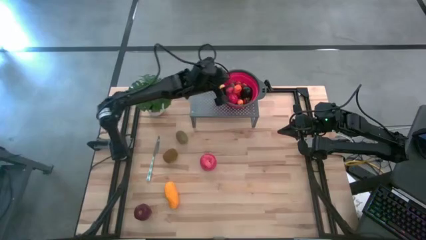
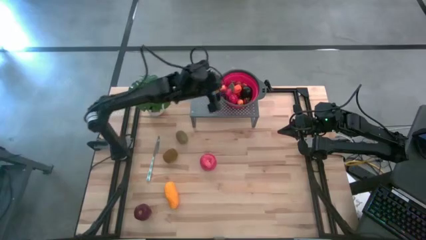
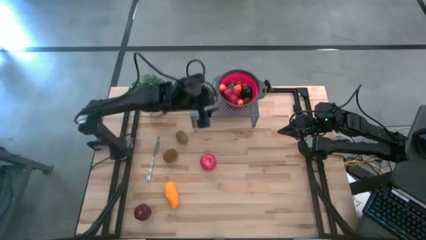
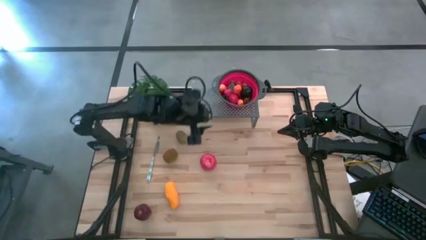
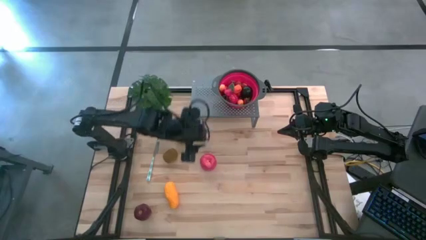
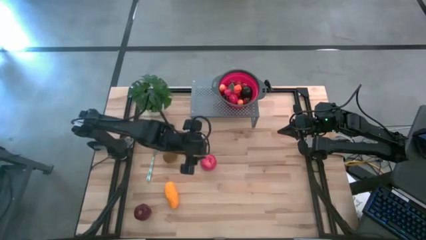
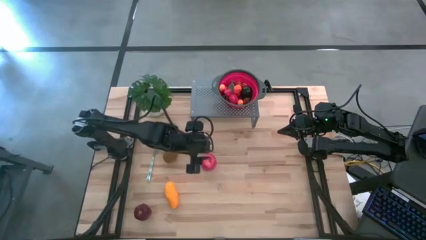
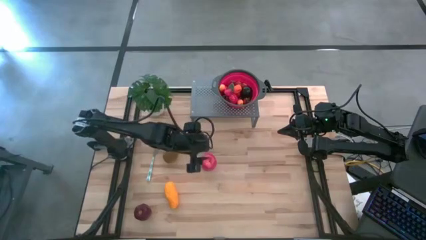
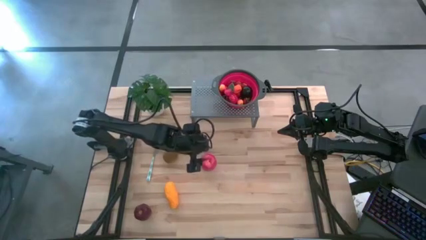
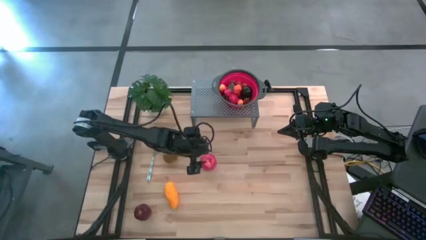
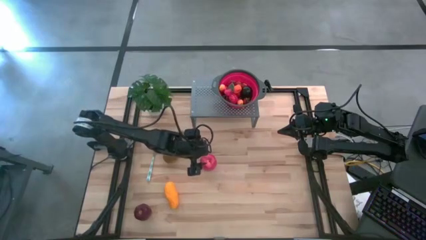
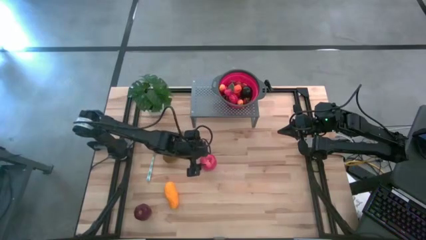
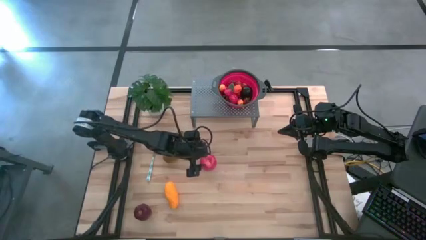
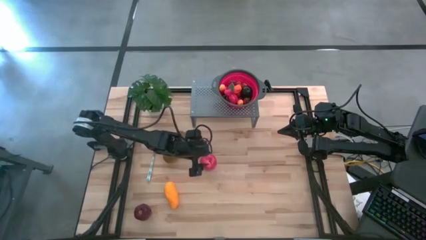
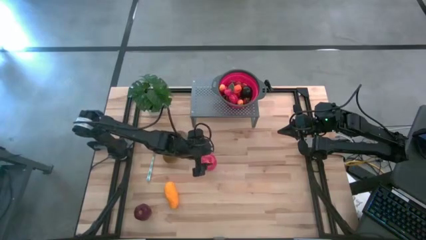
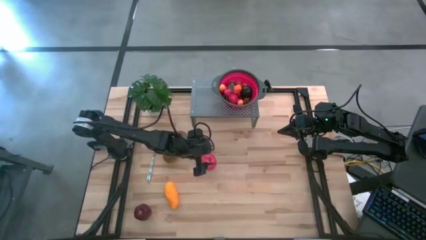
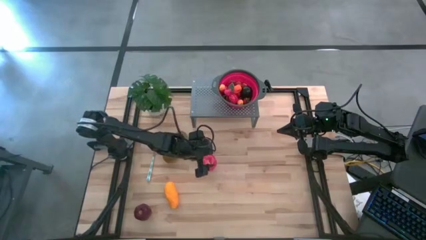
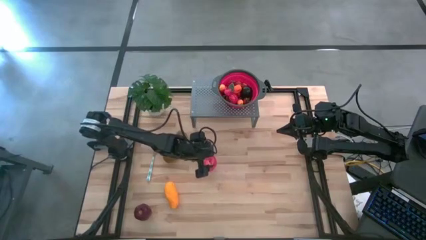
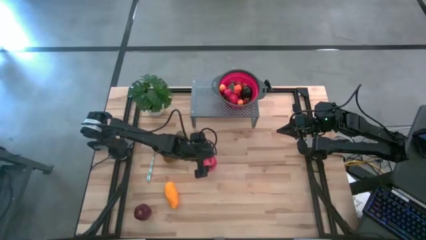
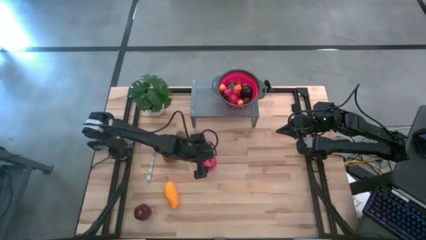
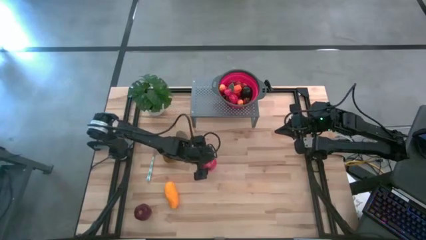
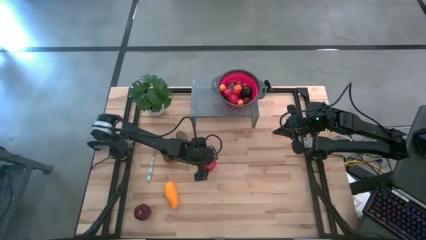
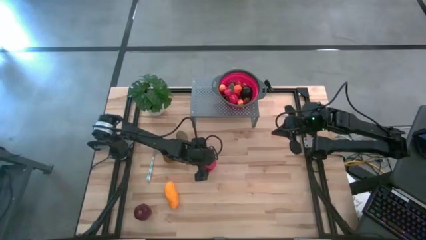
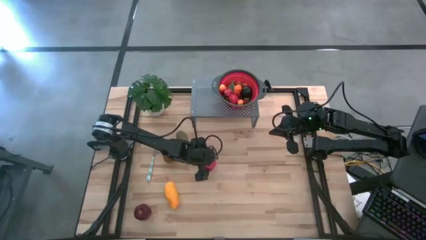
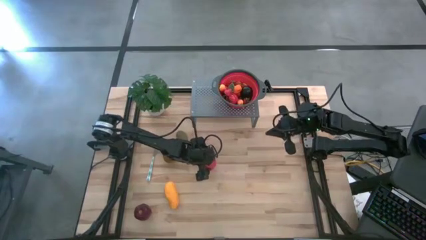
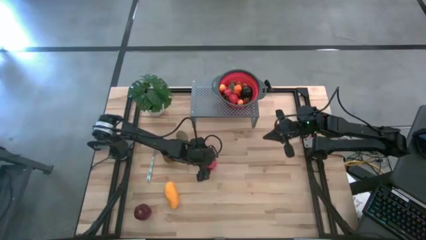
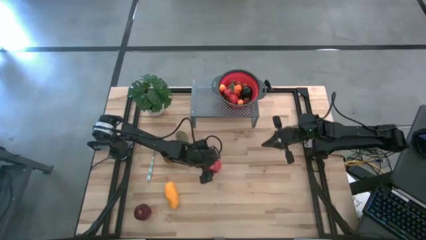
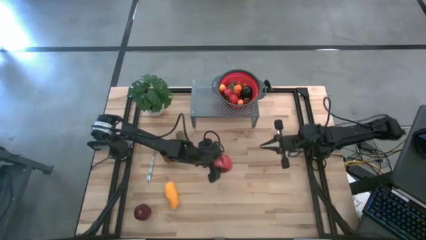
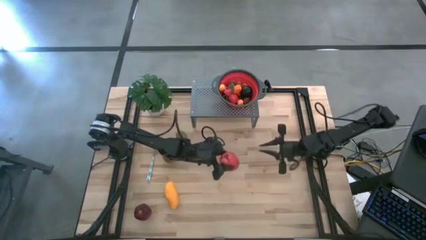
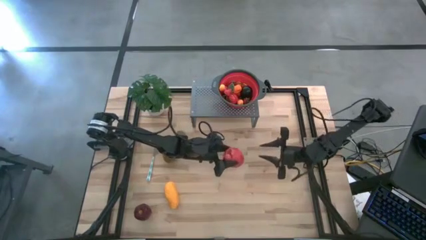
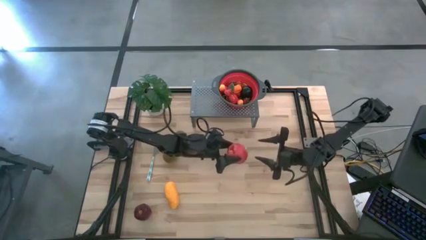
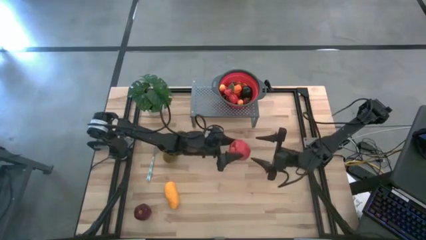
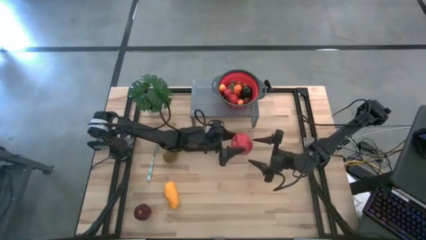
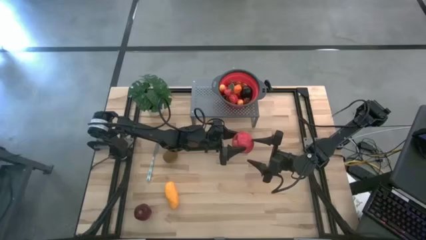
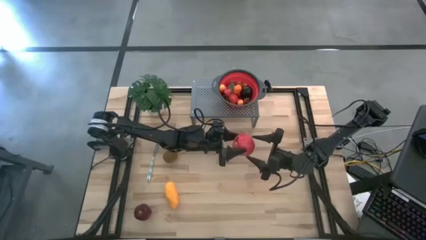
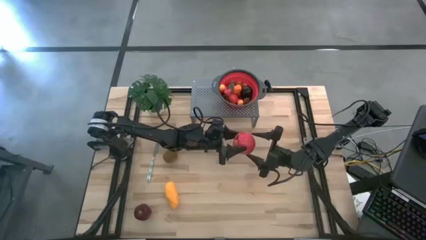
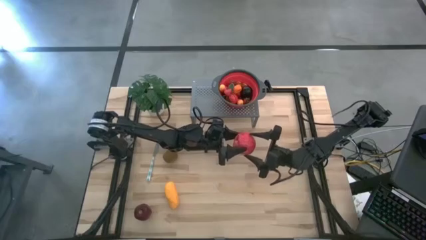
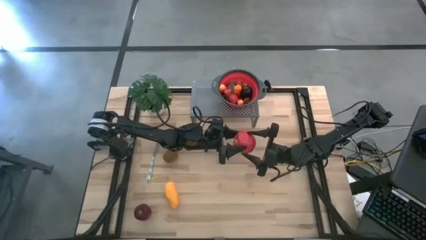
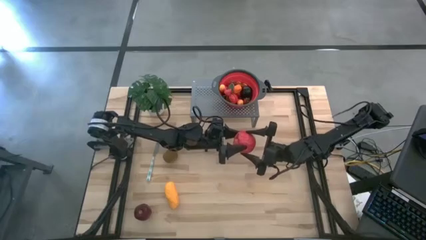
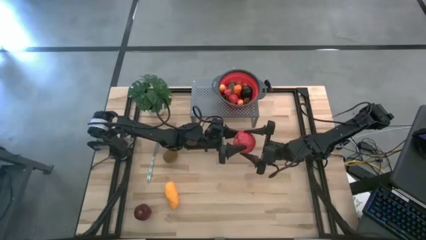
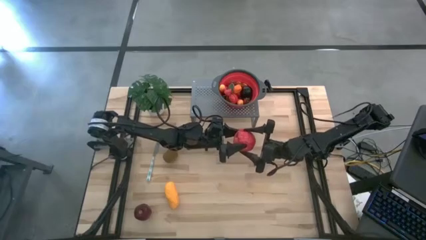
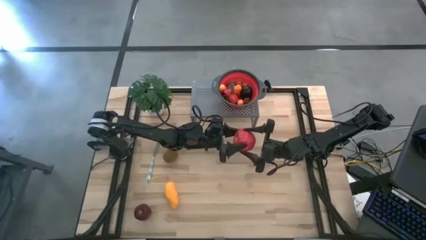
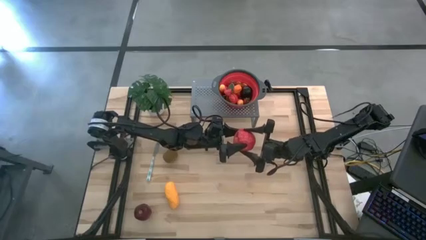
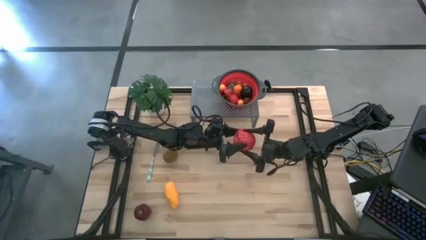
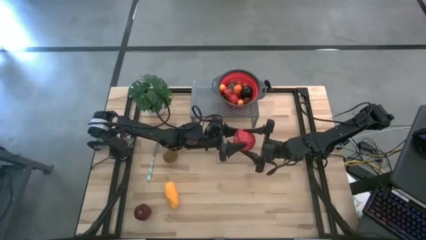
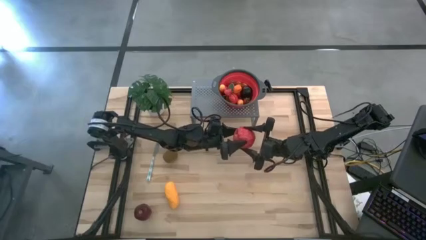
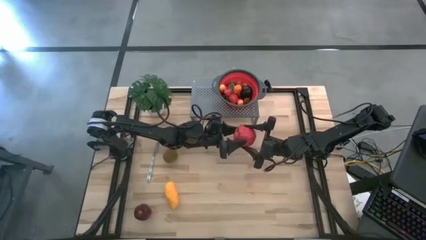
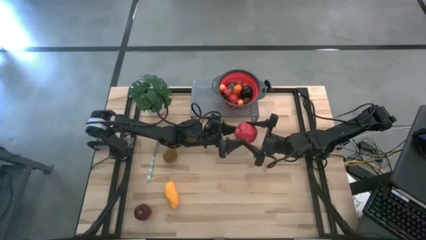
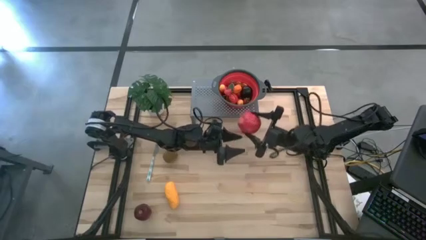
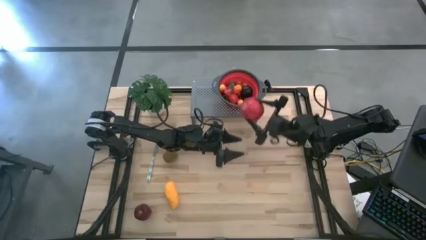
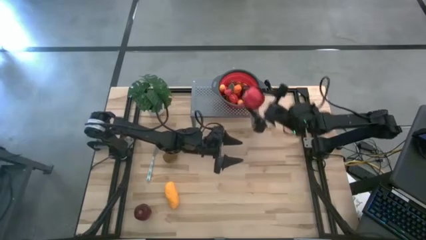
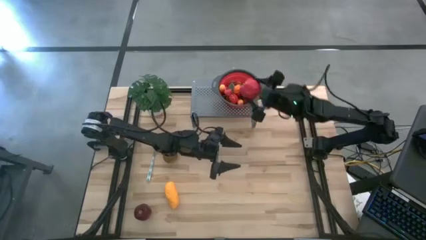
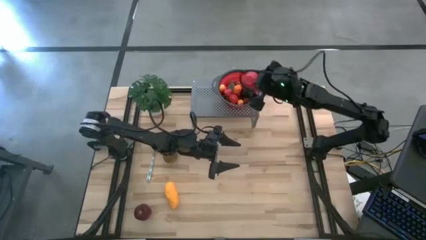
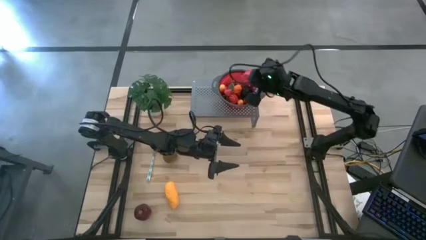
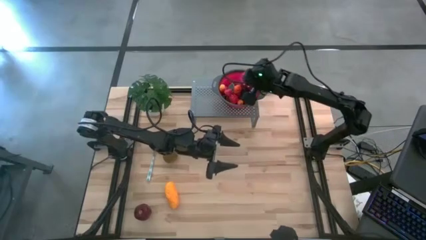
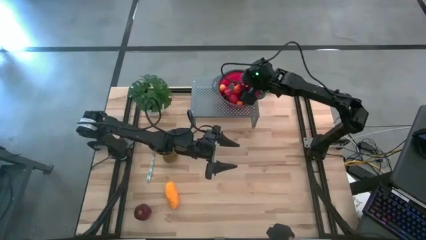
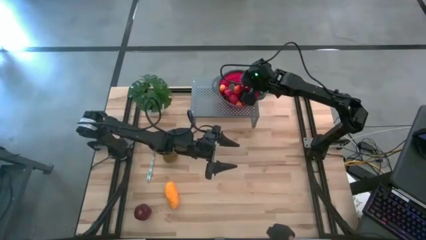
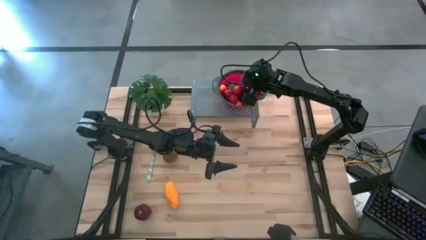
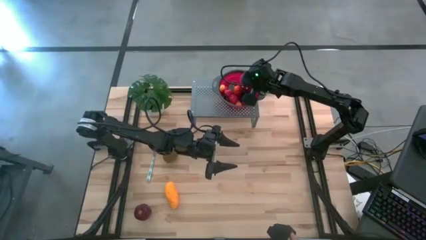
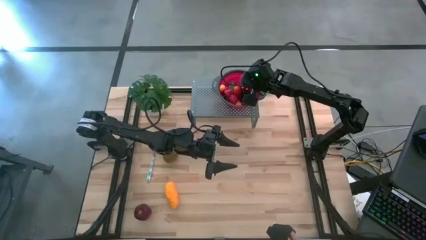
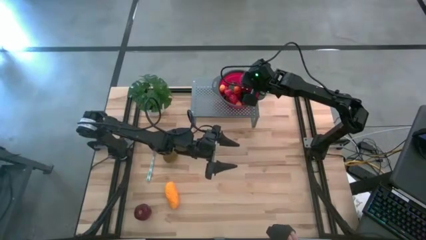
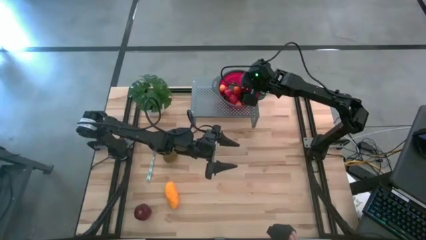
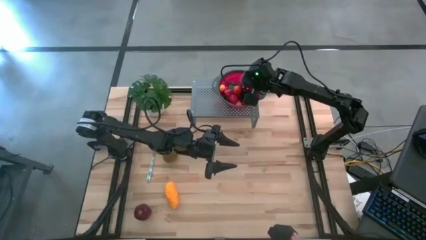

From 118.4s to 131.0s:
Task: Pick & Place Fruit
Put the apple into the strainer bowl on the shelf
